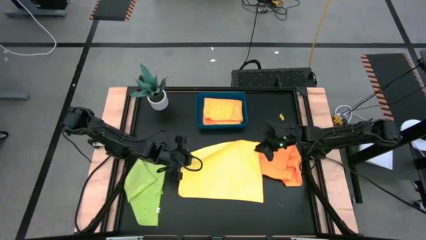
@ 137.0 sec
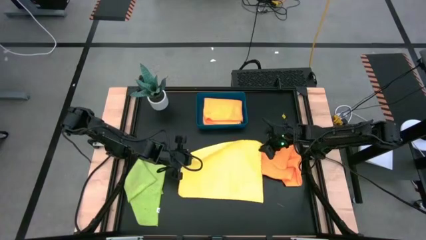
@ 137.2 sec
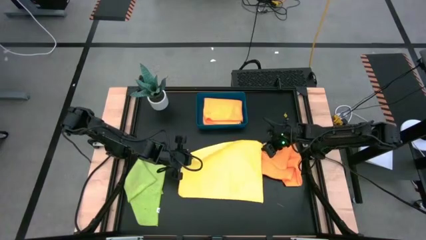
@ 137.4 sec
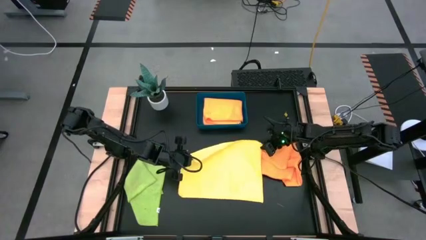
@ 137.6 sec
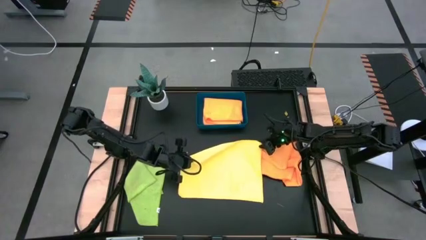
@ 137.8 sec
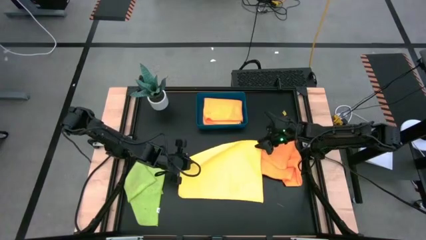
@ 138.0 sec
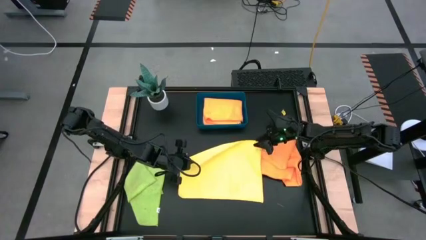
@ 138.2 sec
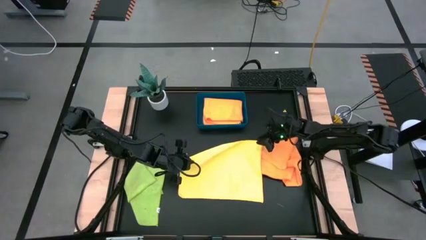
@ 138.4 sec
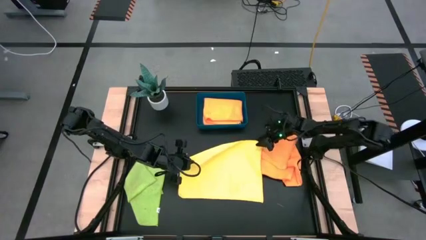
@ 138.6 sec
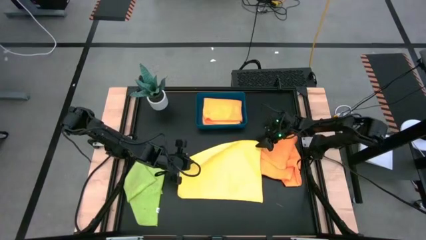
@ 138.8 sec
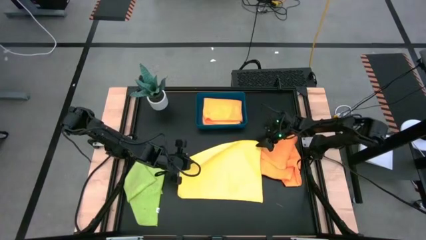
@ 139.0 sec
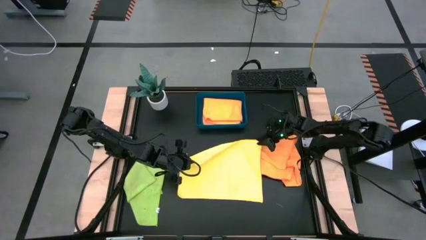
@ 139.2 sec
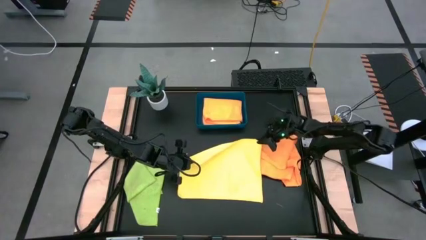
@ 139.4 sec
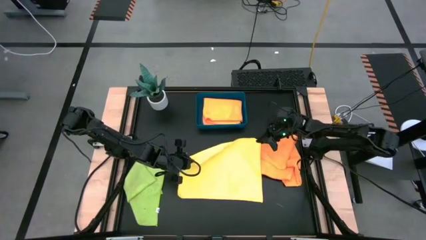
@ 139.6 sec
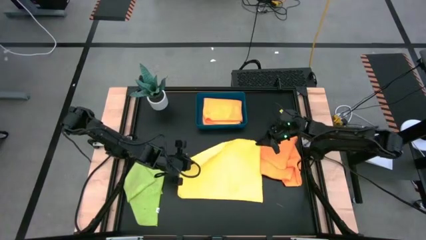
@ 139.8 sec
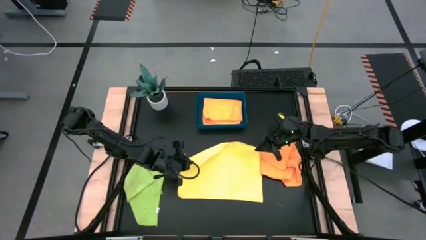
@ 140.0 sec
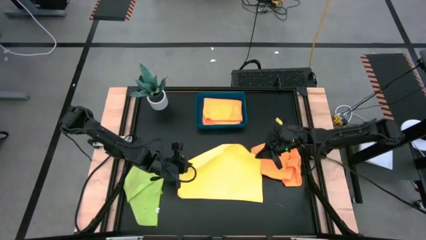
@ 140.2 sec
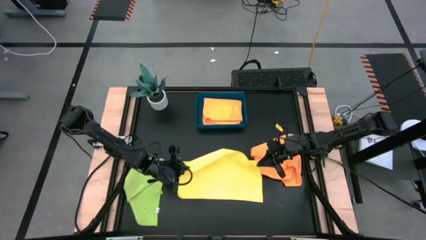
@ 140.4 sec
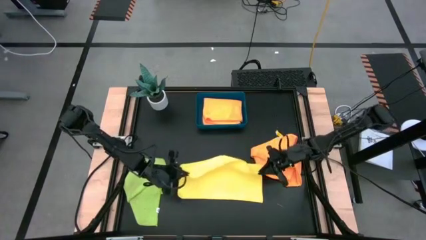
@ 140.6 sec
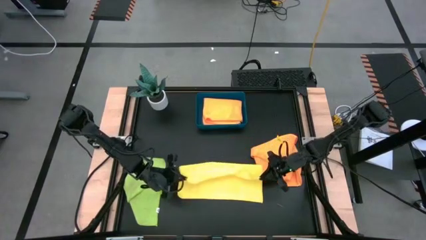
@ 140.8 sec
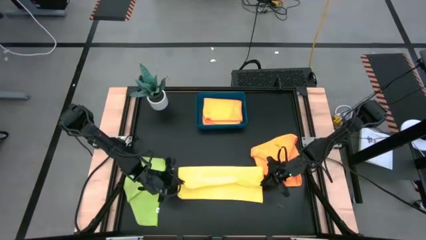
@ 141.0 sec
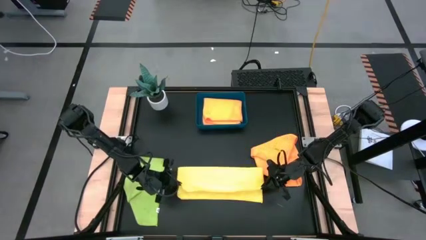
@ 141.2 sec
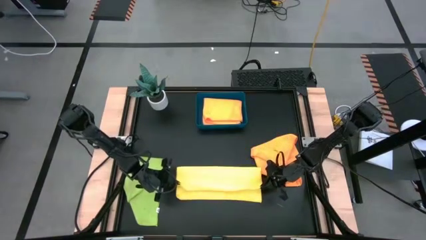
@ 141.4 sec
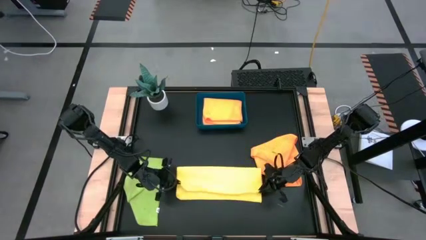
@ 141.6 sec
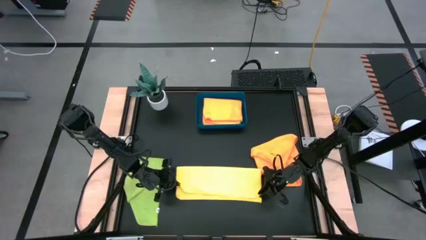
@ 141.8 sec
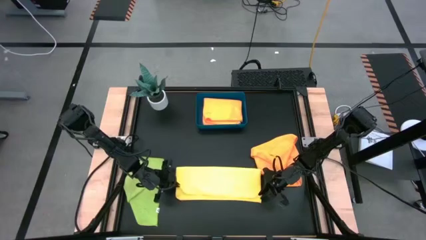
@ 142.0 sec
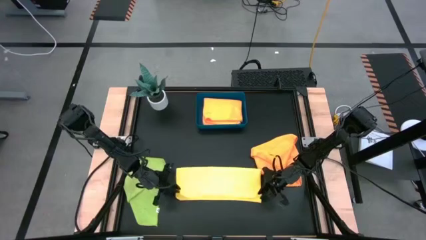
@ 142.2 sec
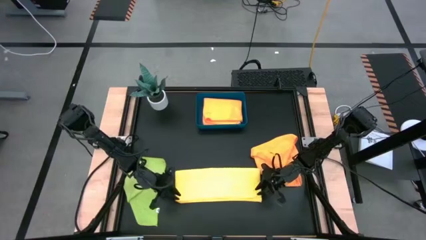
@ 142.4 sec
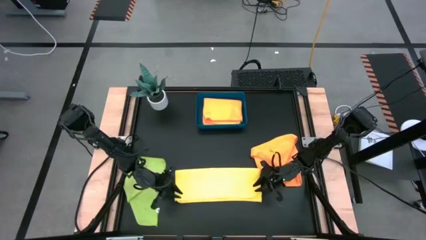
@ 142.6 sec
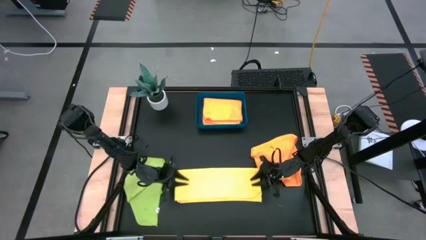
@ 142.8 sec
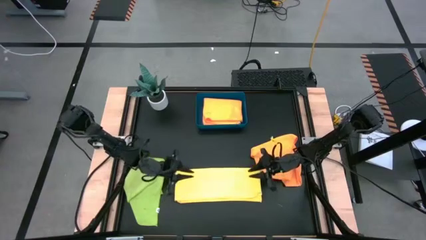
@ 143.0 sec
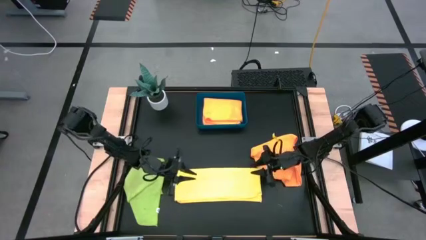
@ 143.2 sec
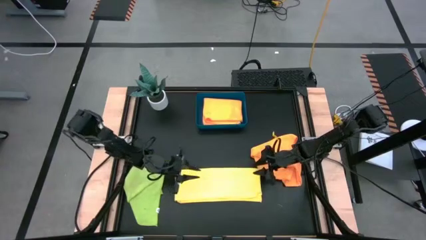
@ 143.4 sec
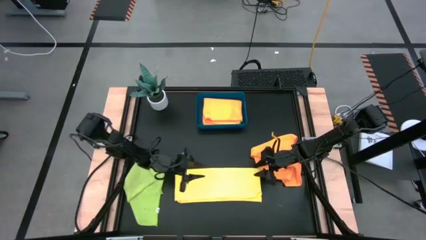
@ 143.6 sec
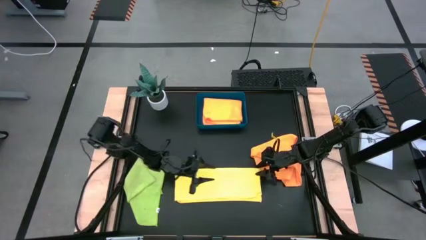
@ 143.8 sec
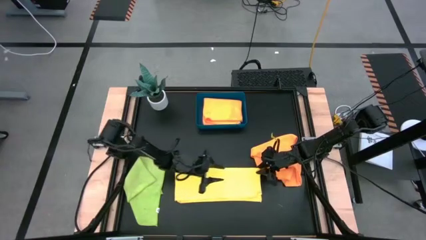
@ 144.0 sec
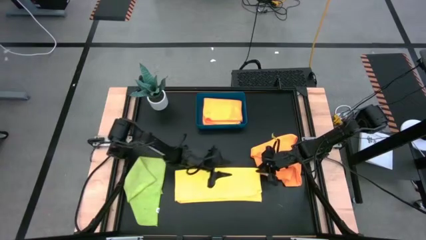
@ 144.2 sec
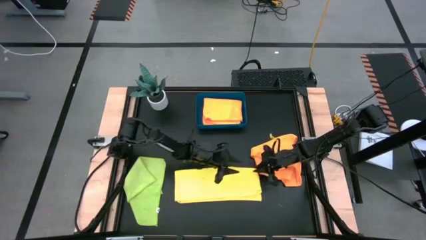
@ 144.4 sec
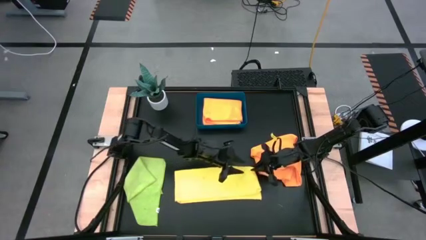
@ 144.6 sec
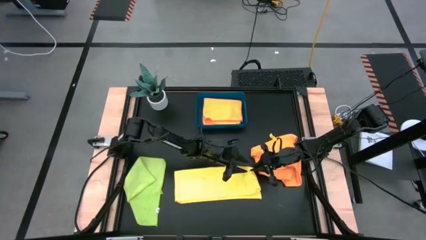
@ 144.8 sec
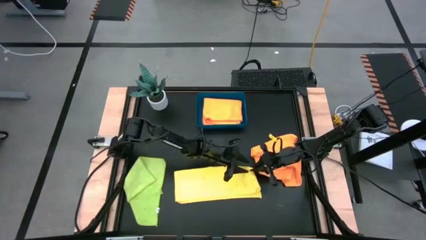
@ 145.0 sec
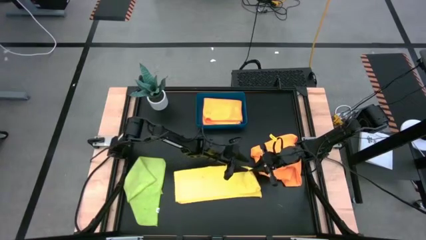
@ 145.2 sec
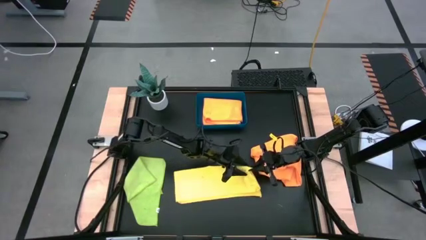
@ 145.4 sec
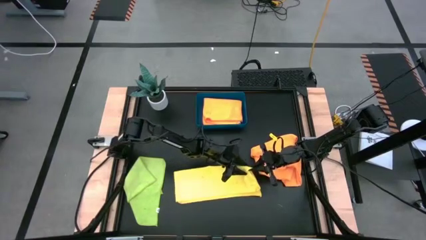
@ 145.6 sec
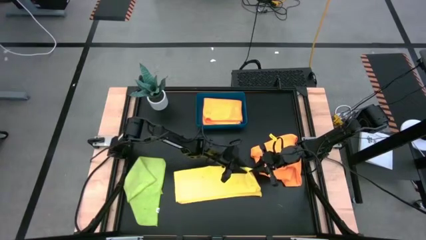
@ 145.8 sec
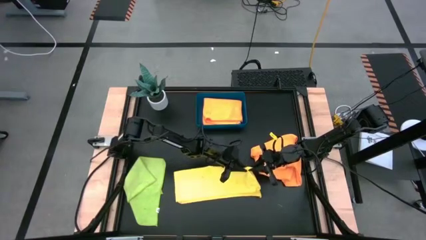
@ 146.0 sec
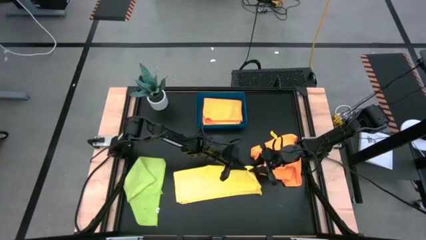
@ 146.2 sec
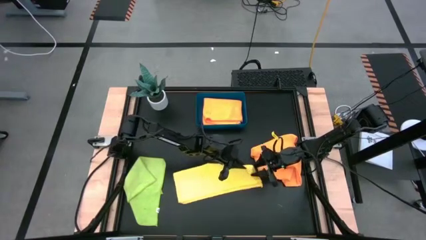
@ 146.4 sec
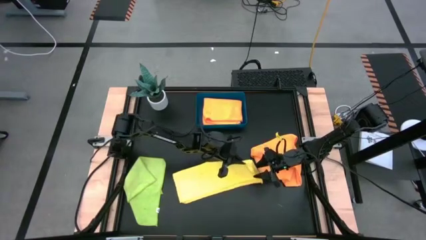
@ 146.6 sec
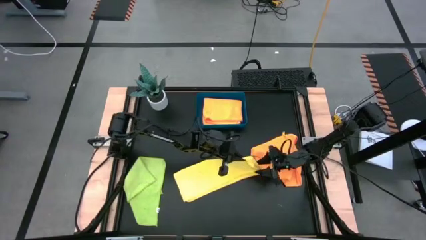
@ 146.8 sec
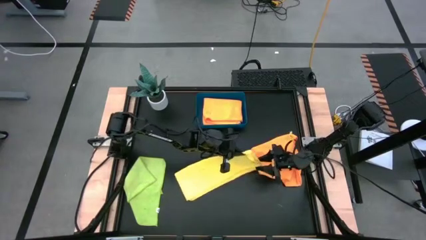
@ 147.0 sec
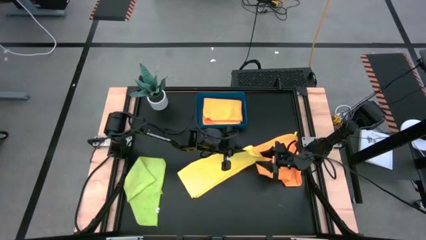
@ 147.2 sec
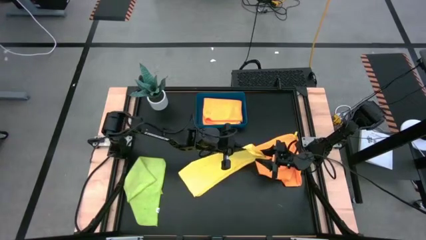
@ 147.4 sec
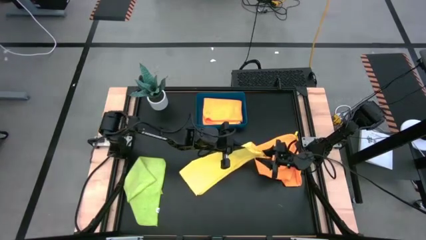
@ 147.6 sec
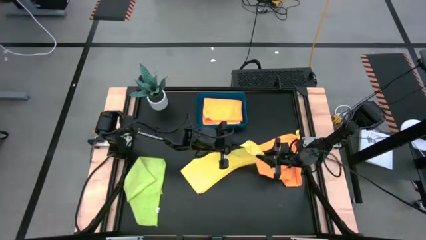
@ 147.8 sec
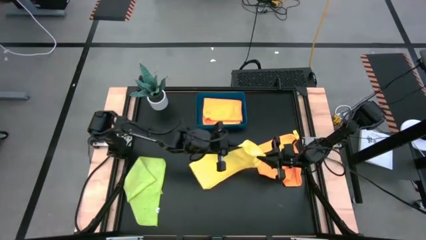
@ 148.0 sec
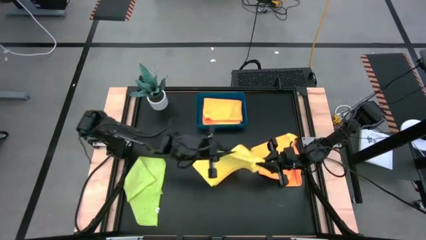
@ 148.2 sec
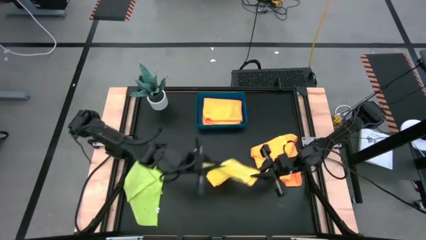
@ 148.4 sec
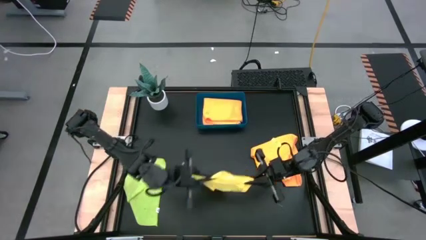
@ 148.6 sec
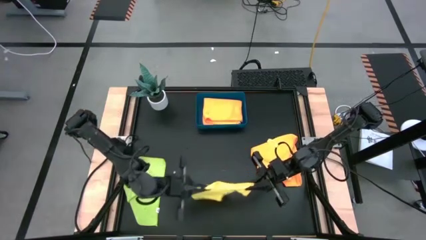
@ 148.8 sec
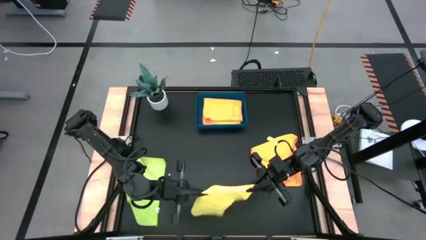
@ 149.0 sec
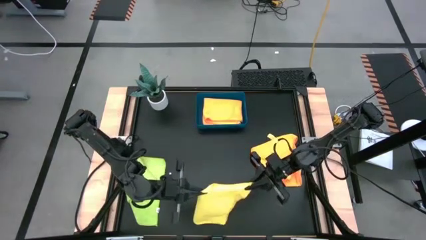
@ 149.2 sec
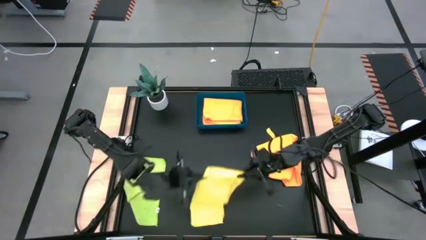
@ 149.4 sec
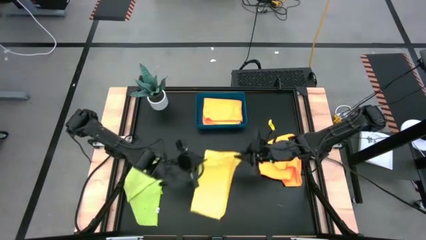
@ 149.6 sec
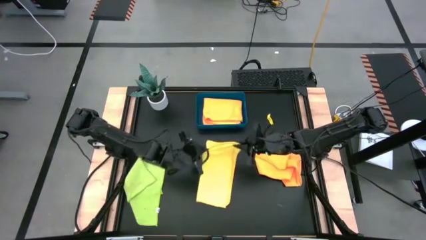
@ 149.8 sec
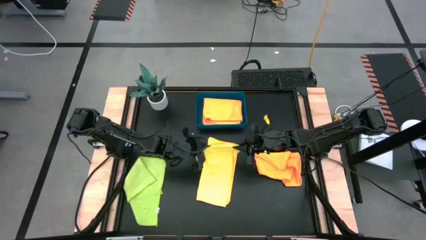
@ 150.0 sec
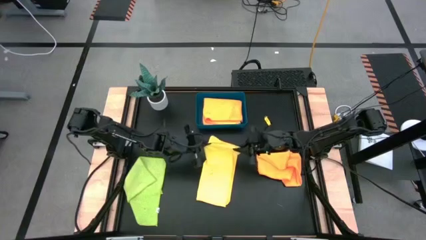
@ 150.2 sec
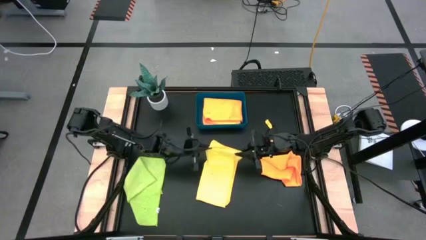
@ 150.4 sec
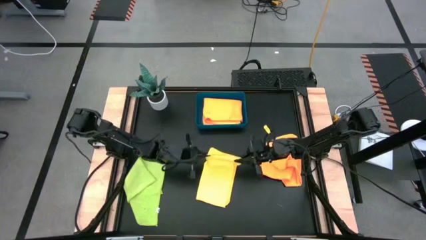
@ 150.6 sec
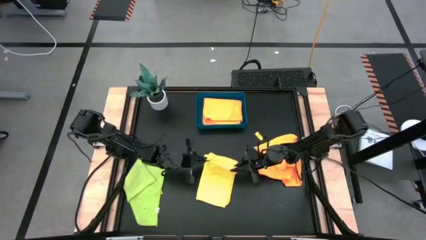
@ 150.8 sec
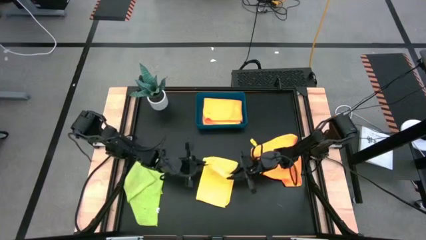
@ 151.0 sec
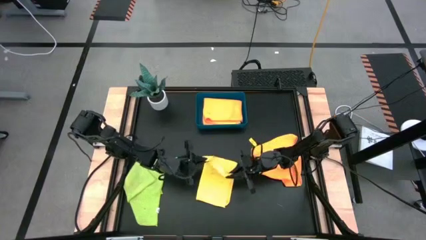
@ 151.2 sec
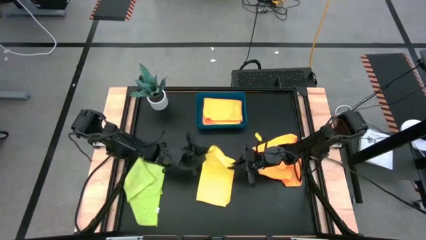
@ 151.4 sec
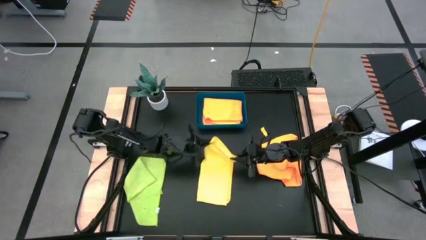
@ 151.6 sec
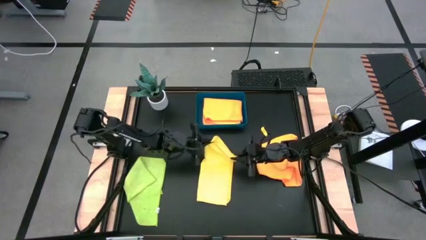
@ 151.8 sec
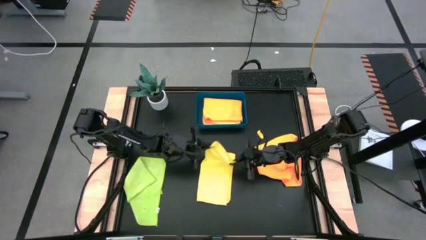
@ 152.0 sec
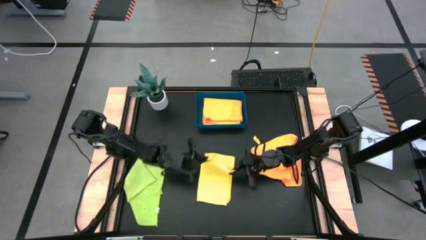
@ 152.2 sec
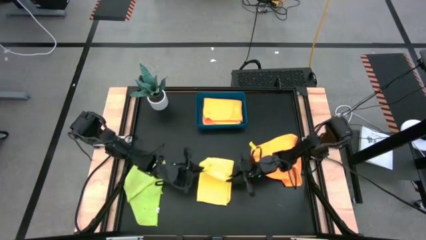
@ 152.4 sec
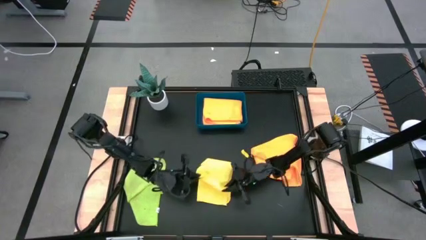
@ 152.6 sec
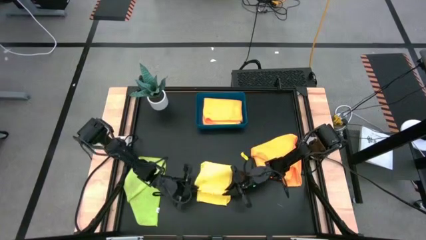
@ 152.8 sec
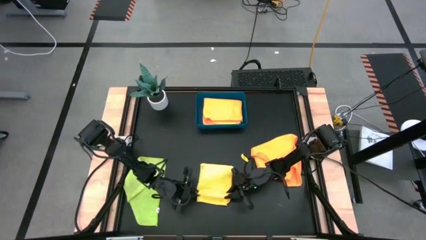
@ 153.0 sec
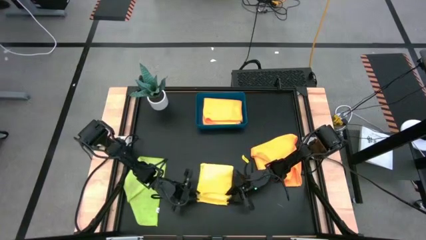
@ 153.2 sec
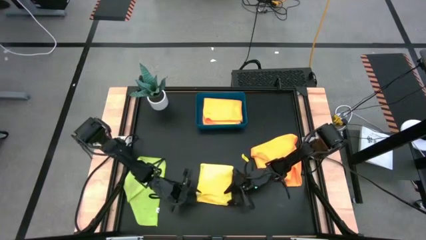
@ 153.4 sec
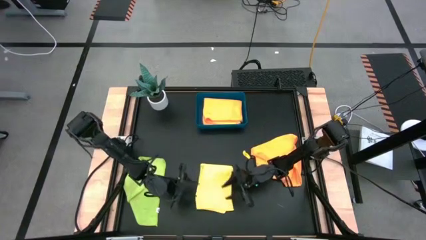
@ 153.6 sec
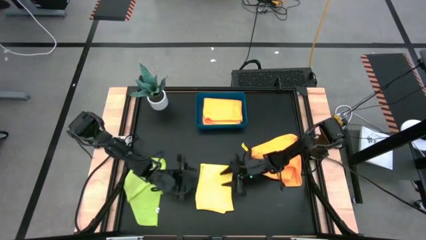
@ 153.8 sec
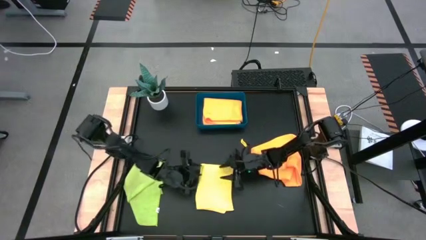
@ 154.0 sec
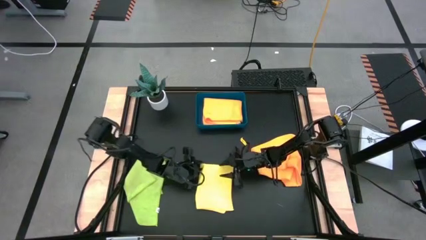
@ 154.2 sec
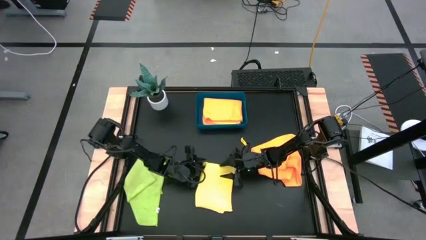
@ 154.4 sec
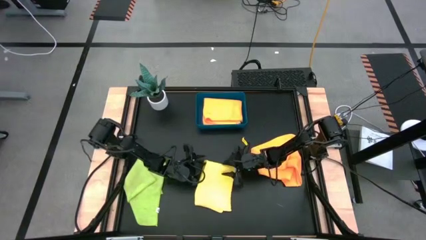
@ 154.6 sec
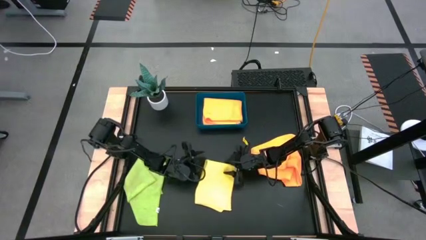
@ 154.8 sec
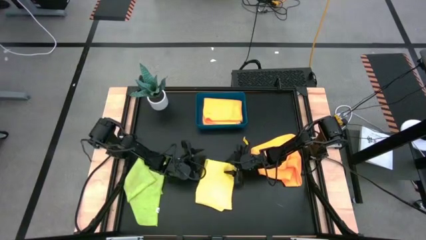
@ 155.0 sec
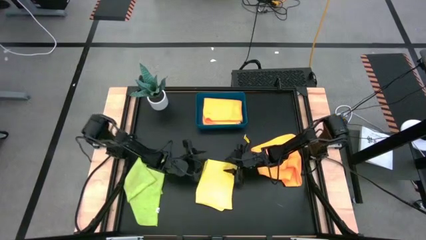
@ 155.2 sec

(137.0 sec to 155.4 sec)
Task: Fold microfiber towels
Fold the yellow microfiber cloth into the blue bin
